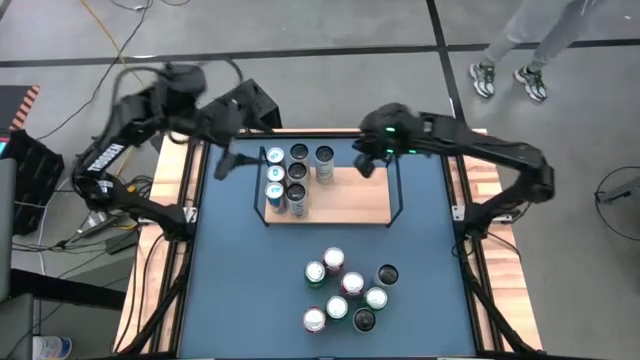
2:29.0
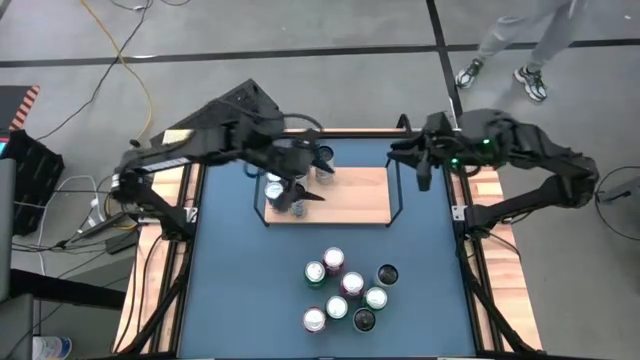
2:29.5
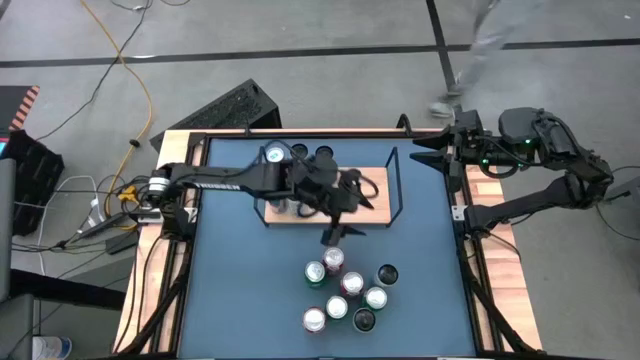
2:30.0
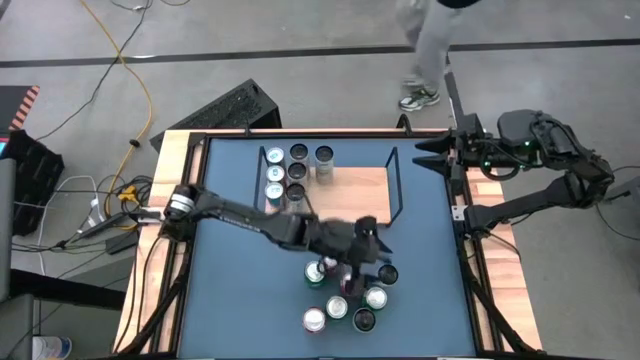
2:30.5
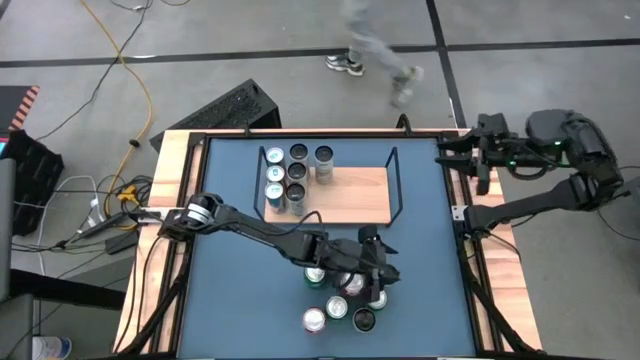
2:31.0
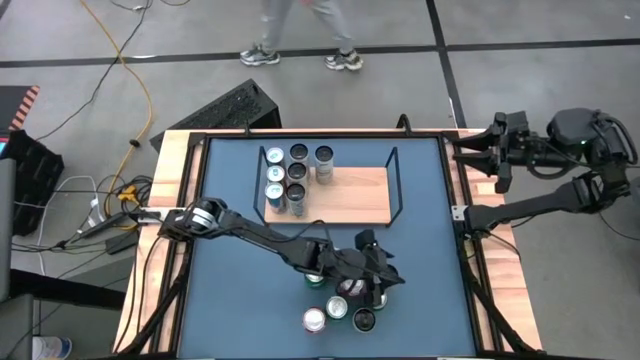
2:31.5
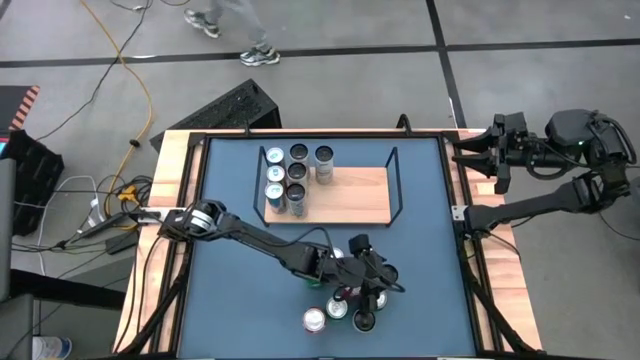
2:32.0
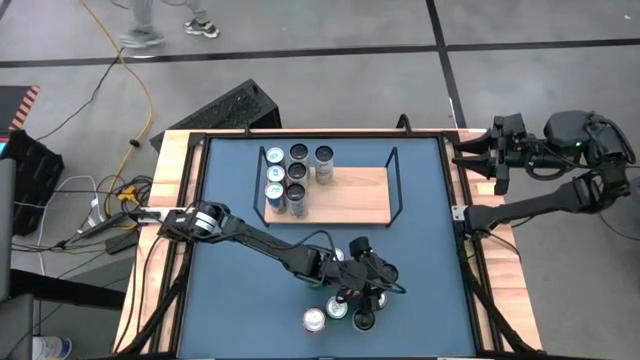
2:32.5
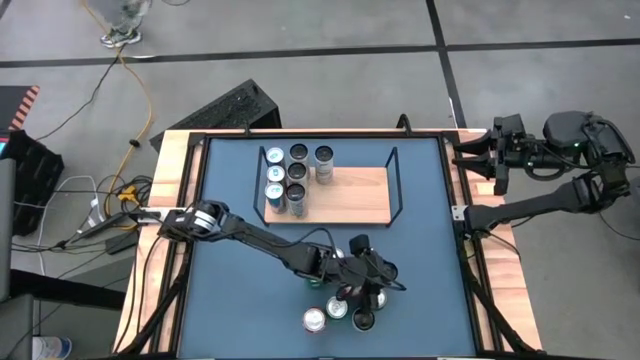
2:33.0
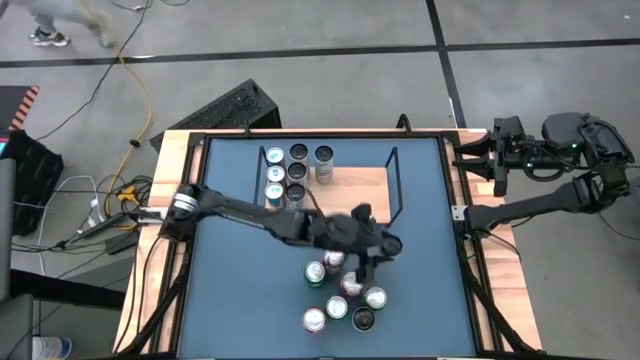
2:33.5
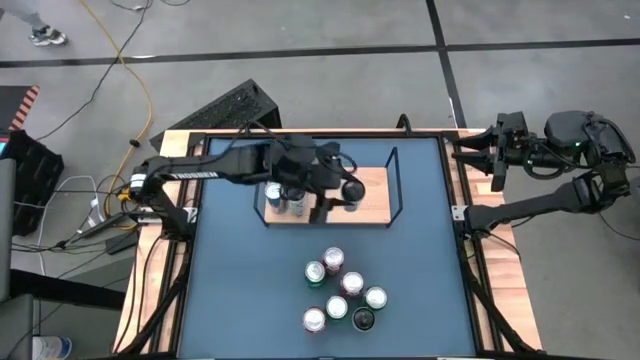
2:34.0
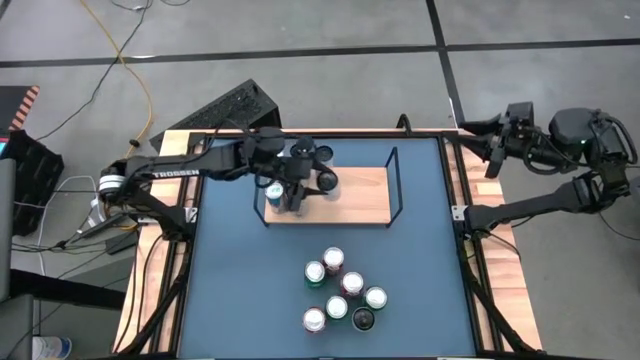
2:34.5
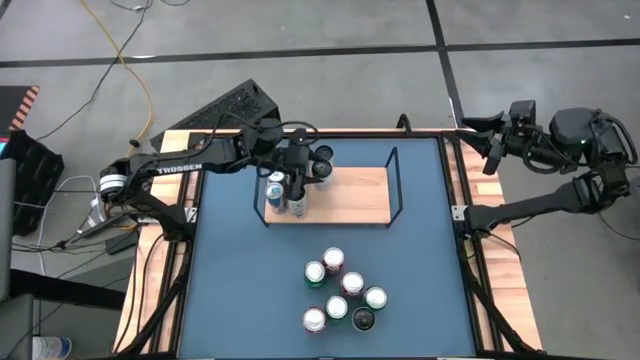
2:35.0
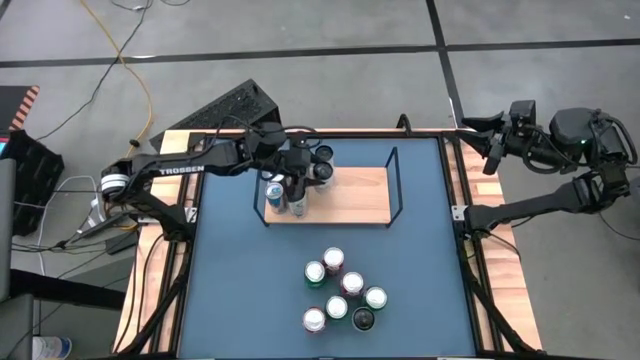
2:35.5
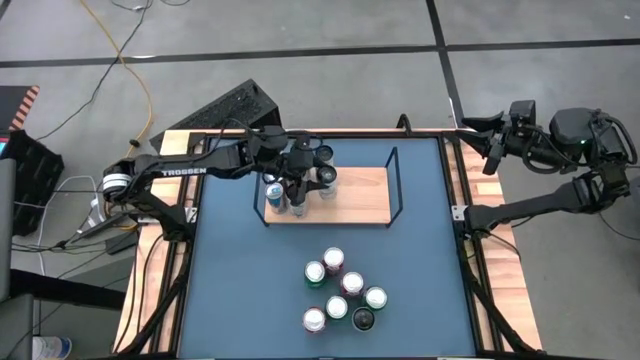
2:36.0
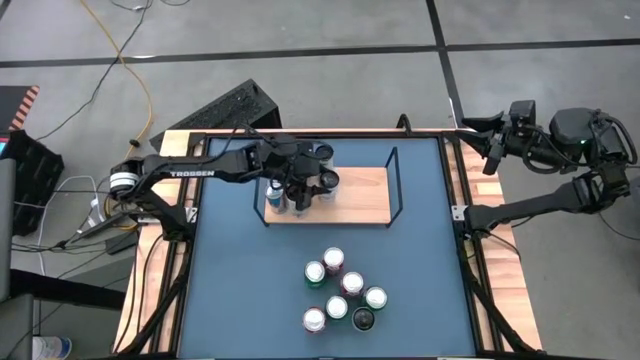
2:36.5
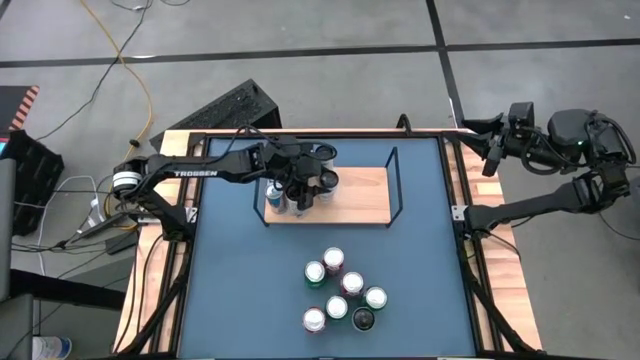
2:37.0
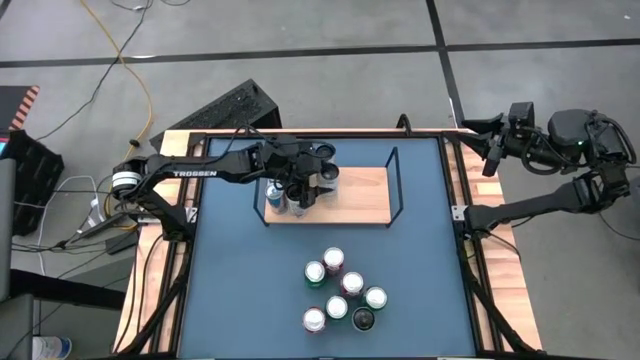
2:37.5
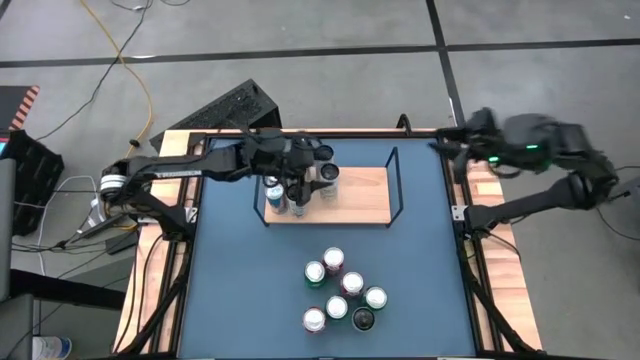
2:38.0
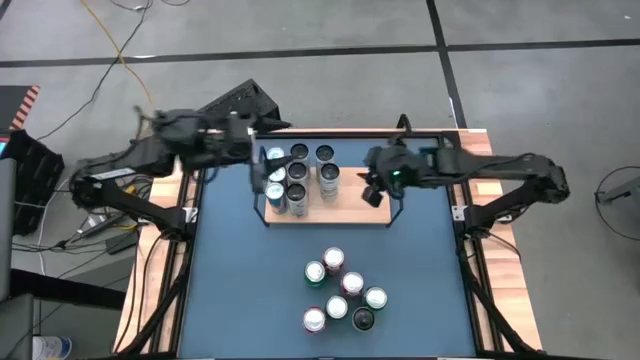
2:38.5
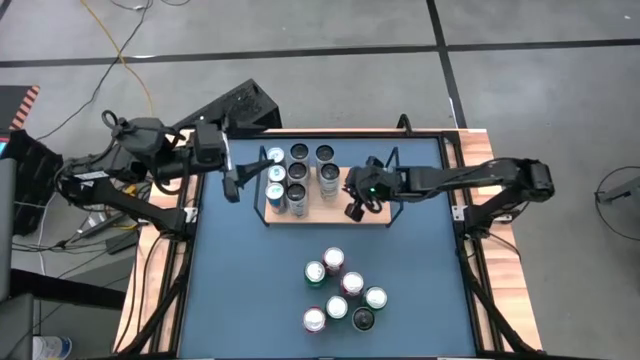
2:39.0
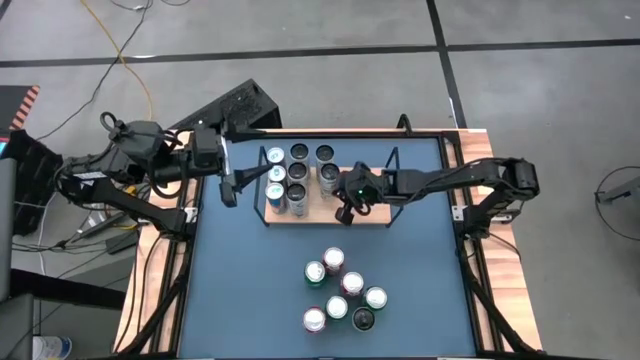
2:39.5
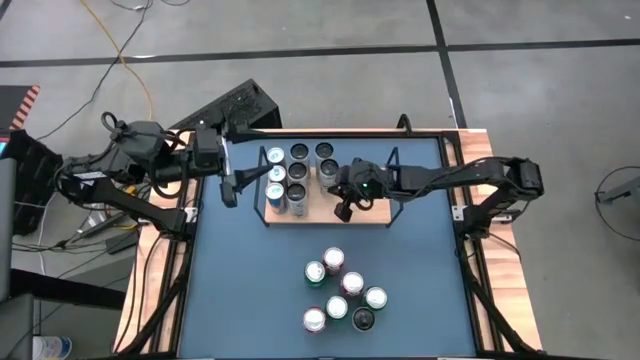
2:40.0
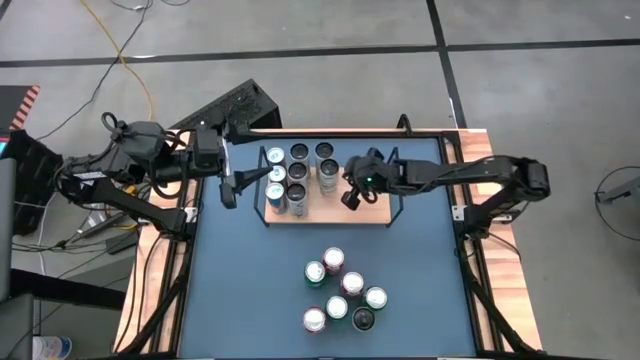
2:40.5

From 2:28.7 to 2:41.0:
Task: Place canned beverage on shelf
Put the top right white and blue soda can on the shelf aligned with the other white and blue soda can
